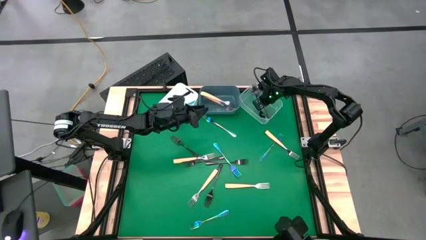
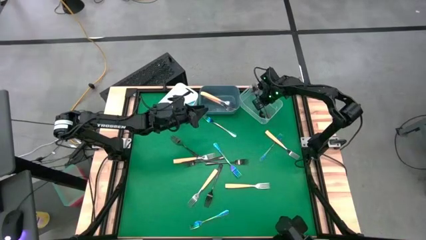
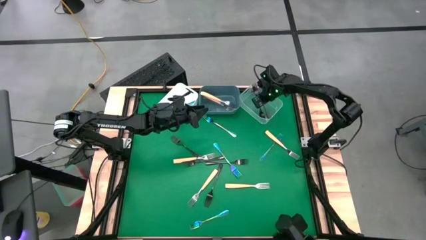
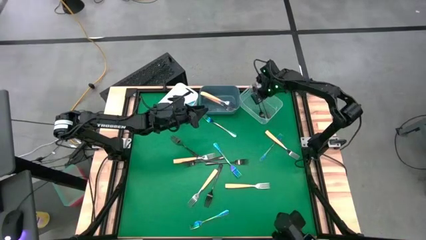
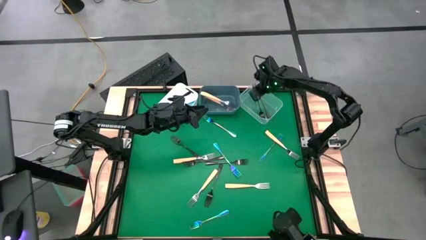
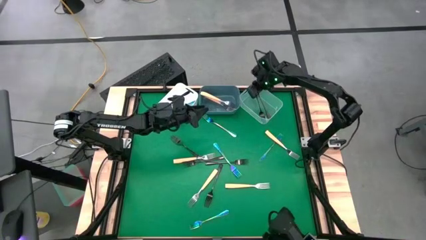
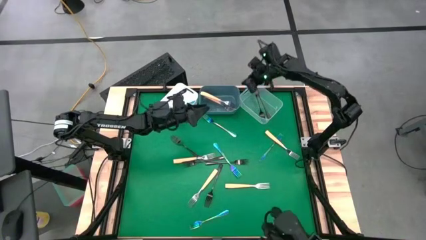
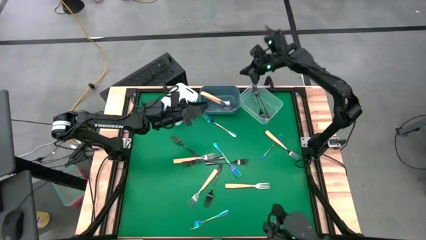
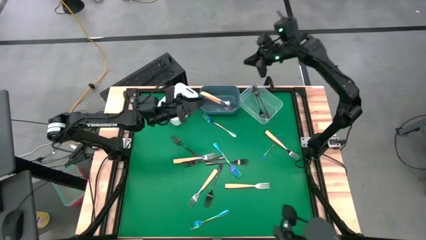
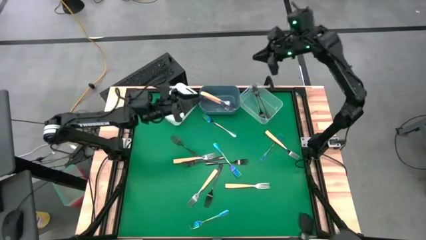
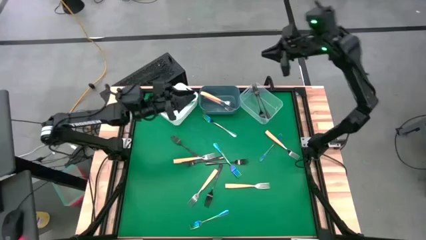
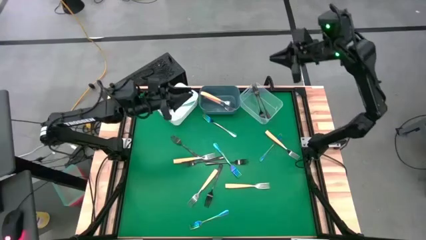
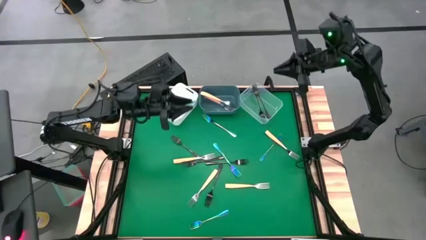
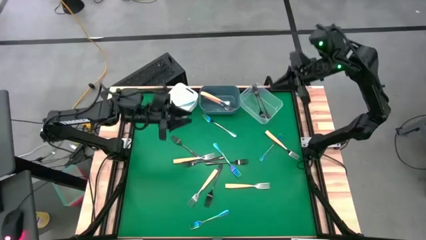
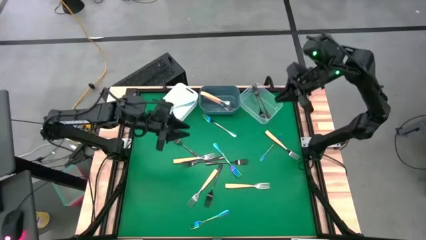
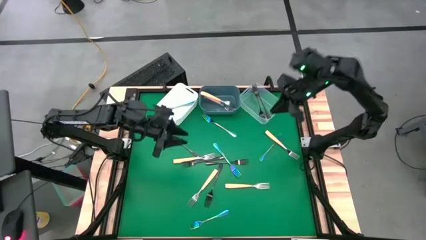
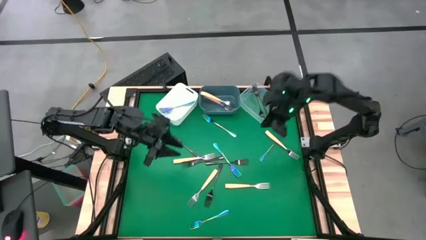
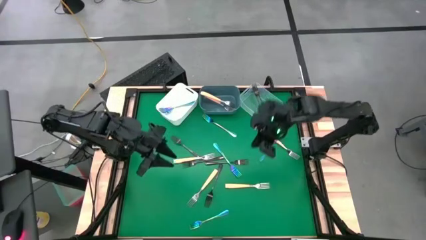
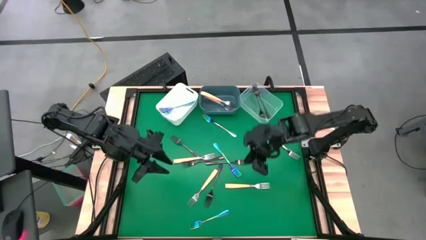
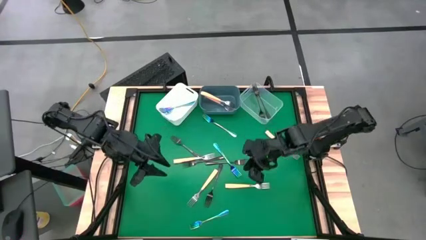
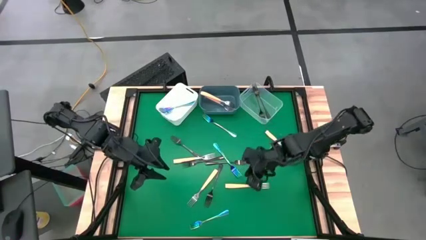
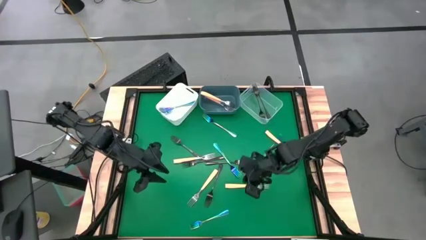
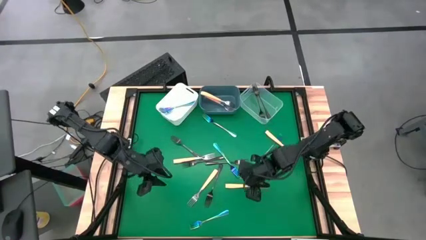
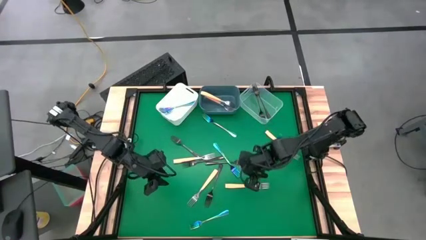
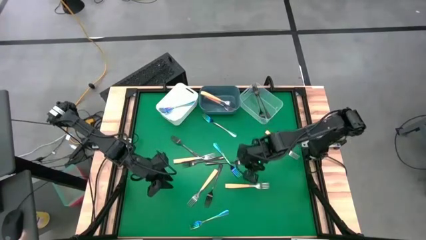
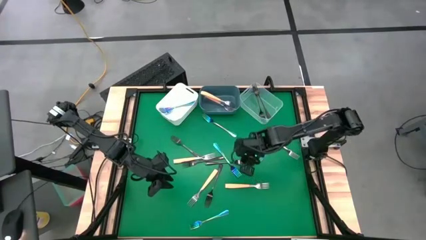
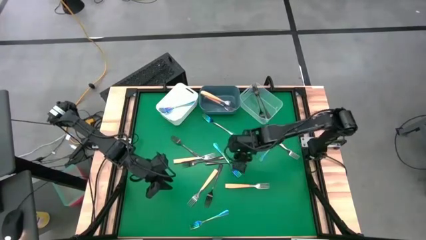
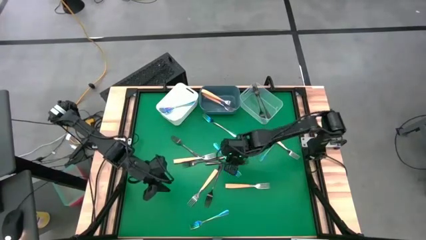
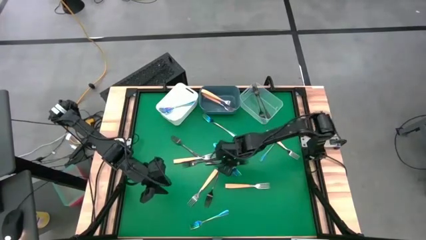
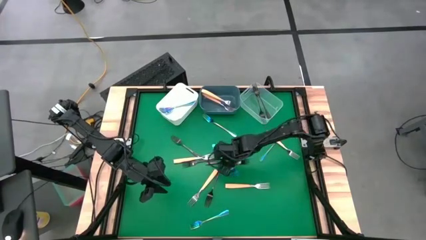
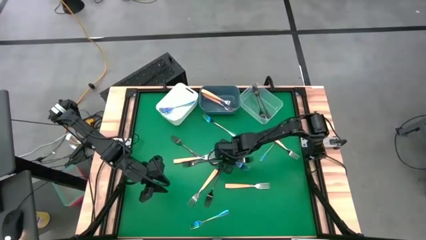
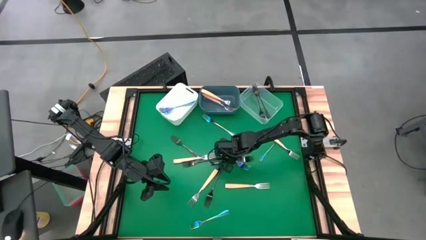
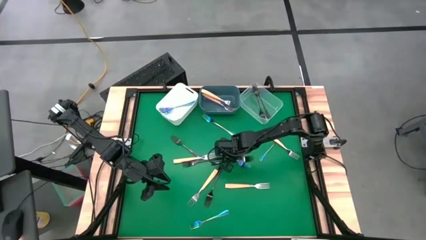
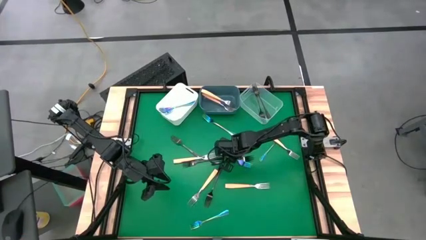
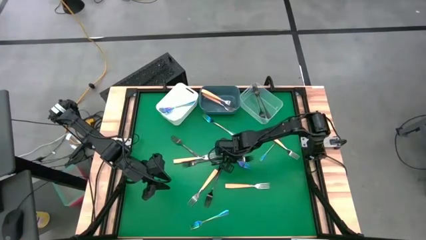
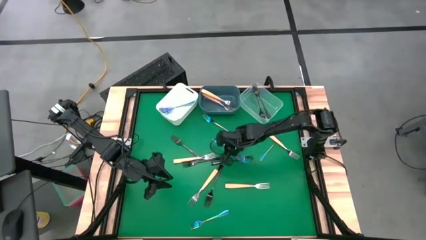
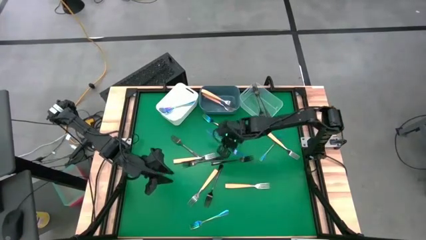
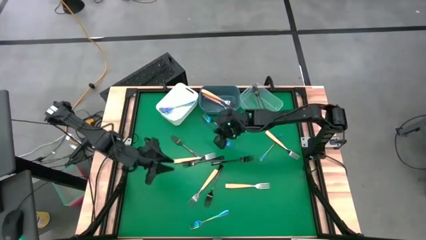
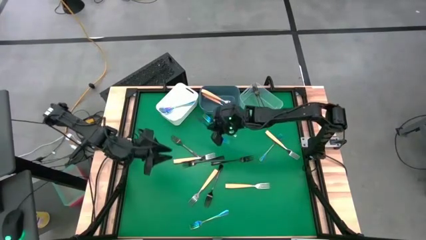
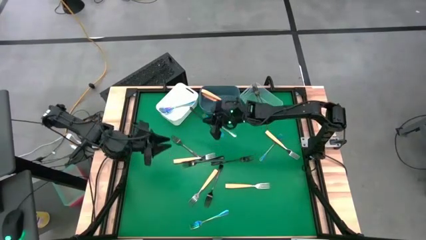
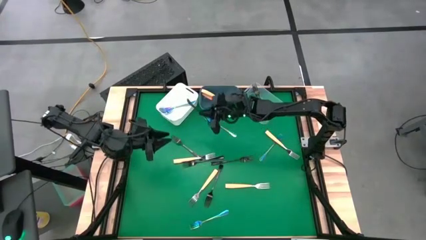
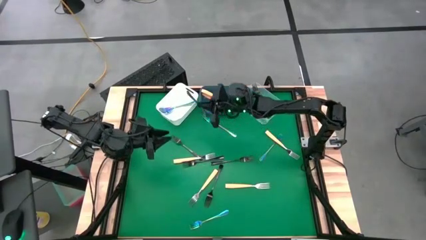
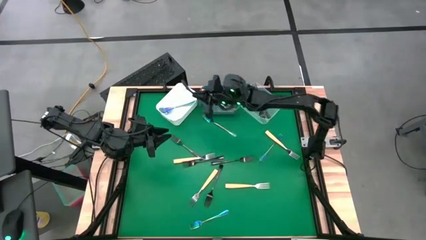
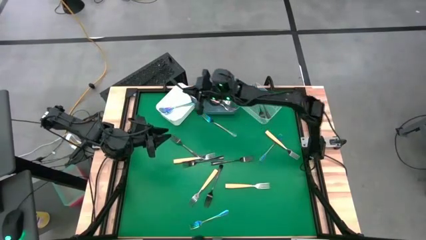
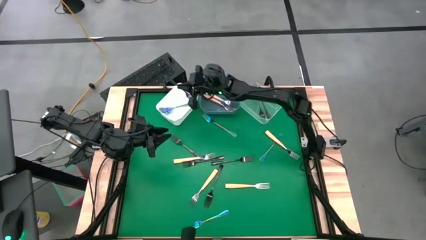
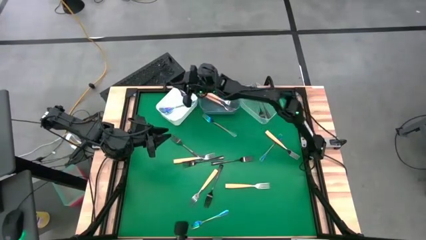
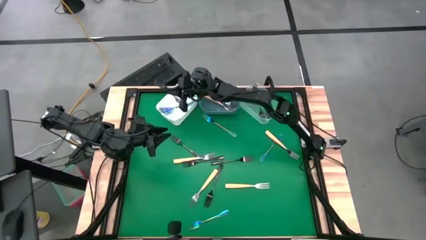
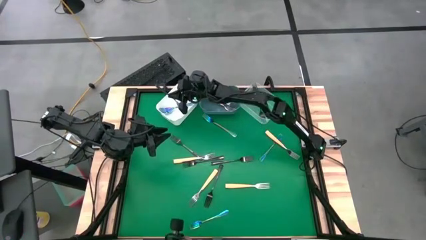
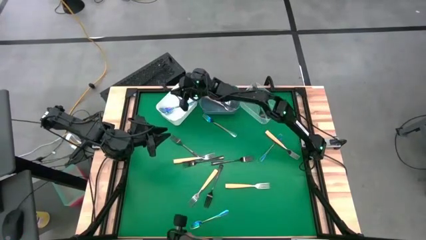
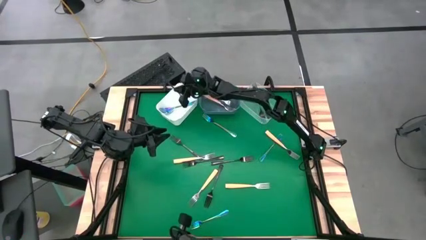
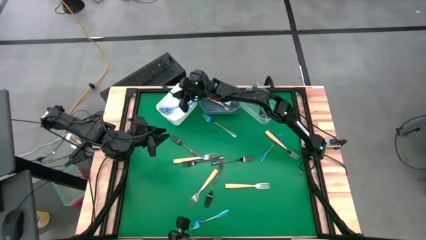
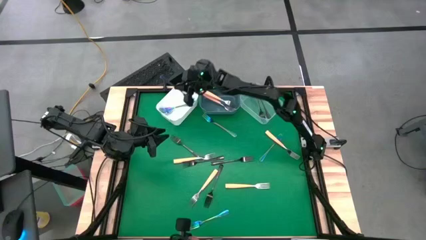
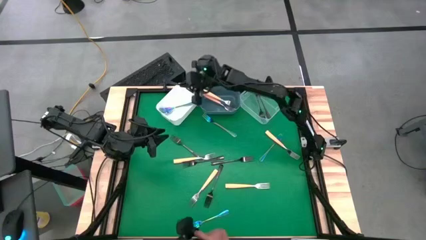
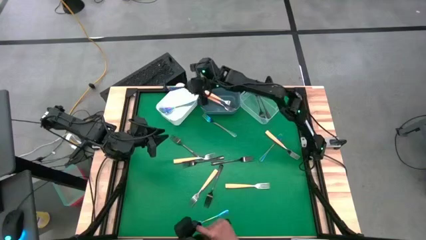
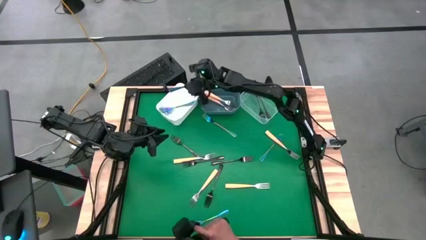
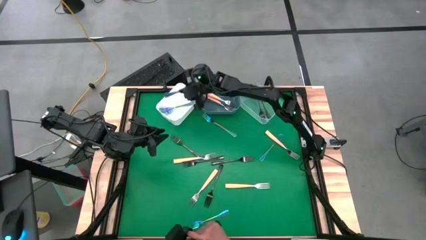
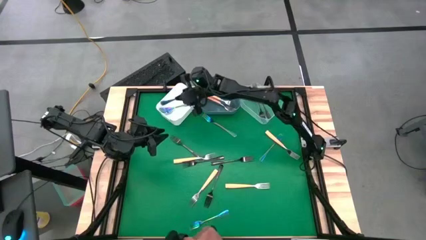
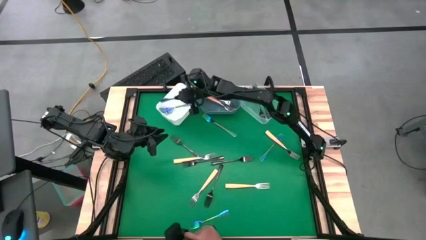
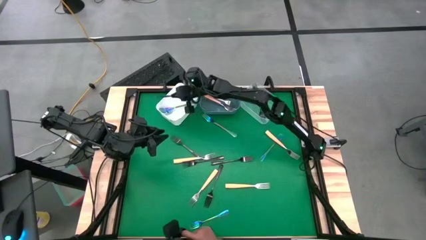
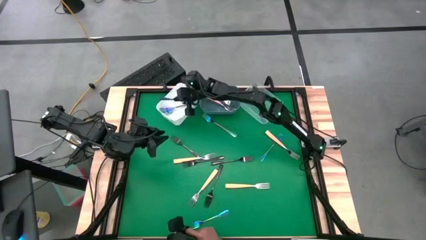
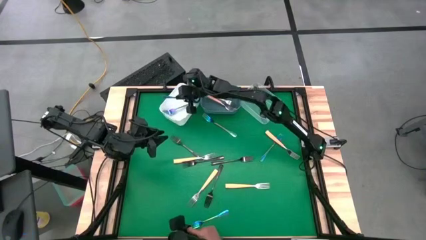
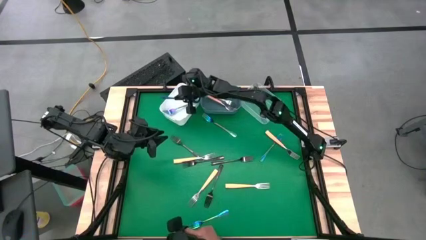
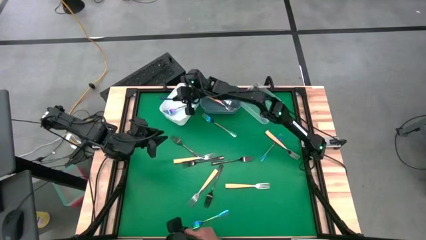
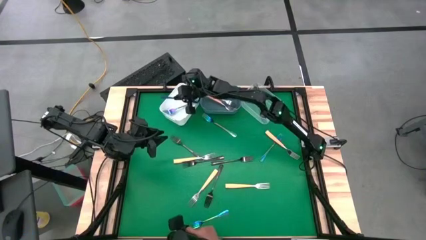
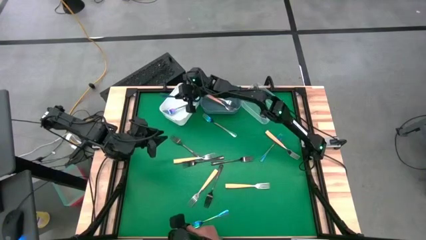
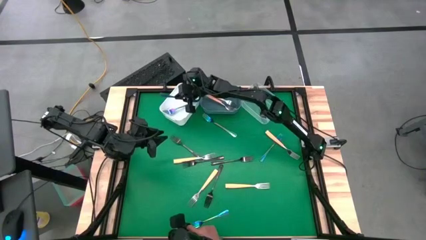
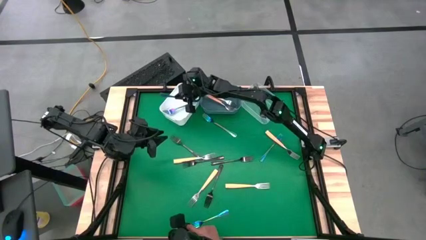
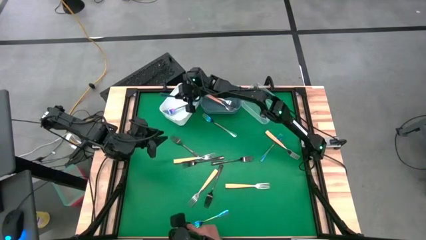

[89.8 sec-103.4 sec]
Task: Sort silverware by color (type)
Put the blue fork into the white bin

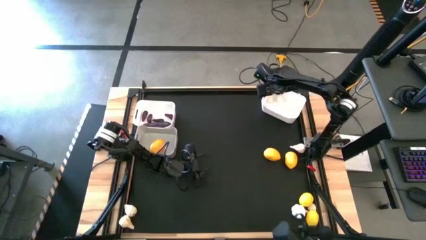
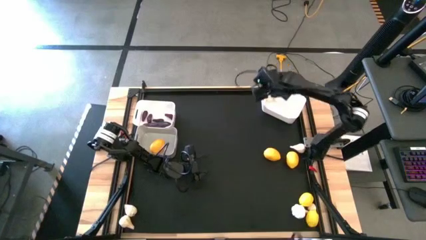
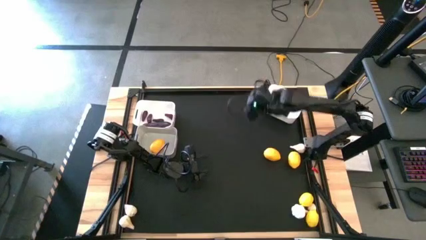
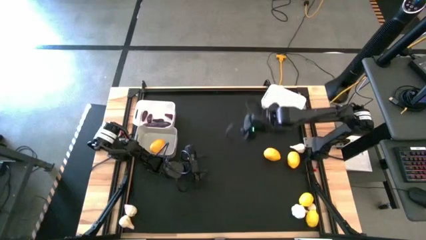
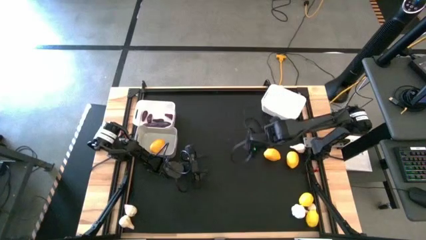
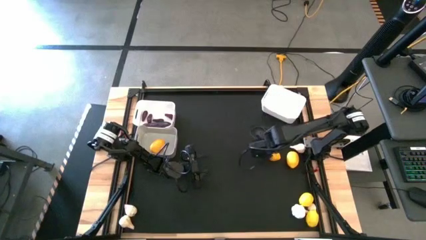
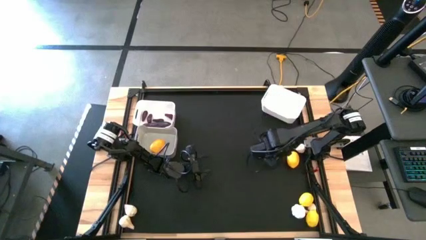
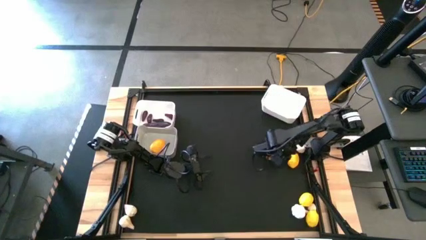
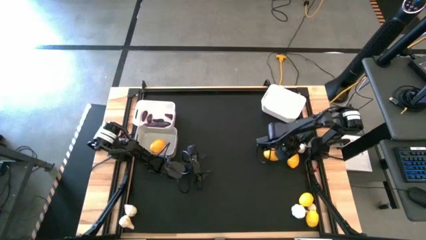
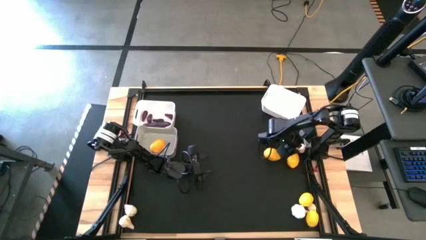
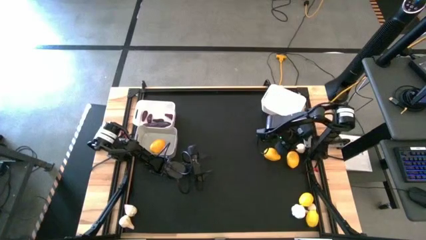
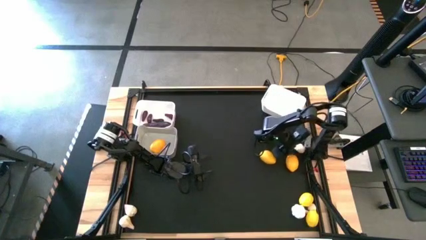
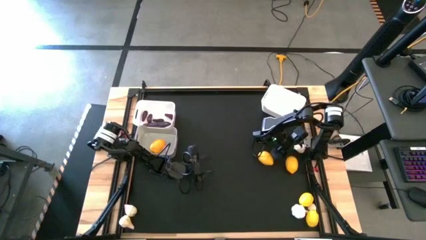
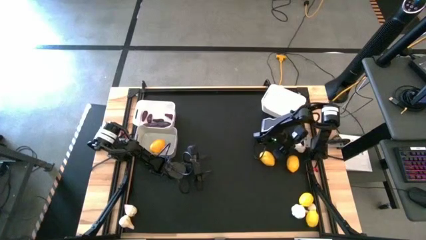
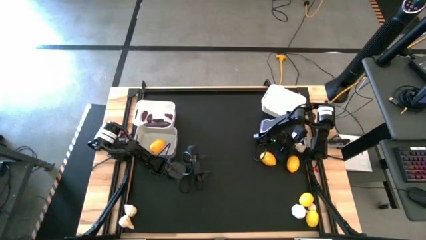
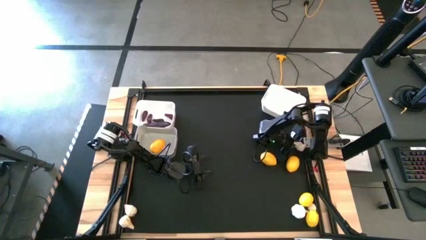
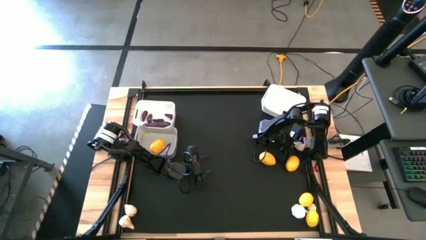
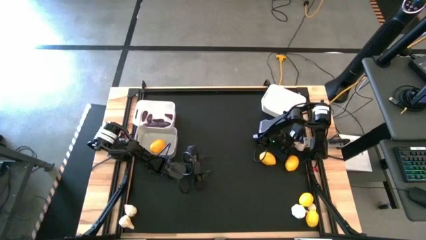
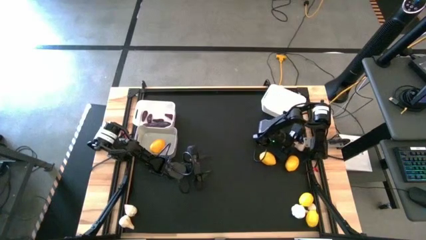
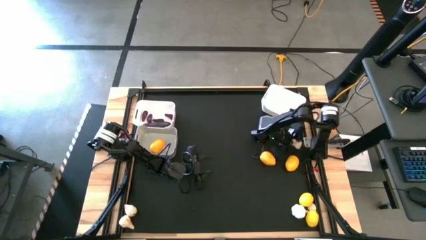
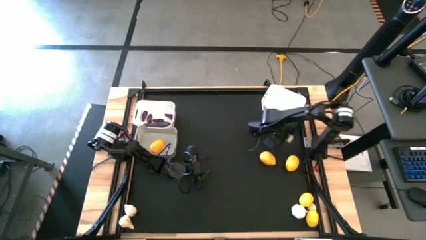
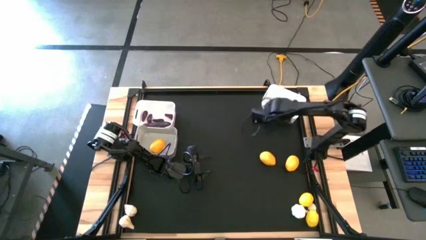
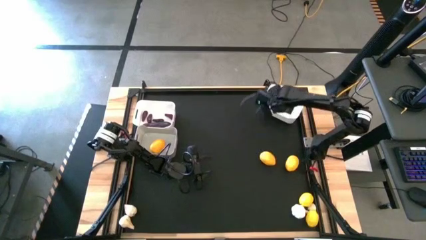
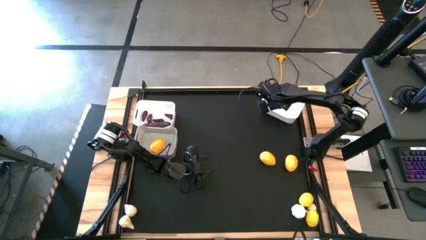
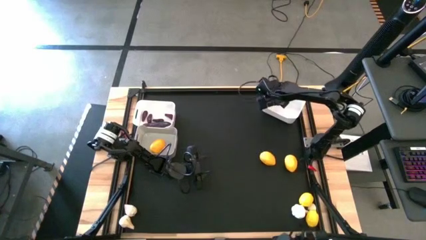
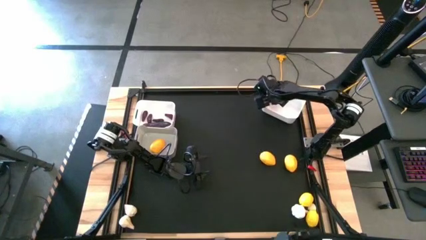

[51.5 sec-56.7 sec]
Task: Sort produce into baskets
Put the big garlic into the right white bin
